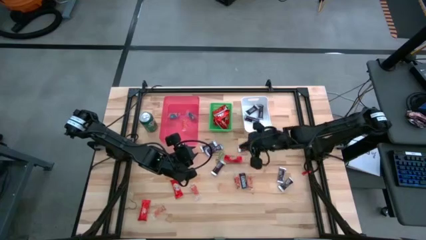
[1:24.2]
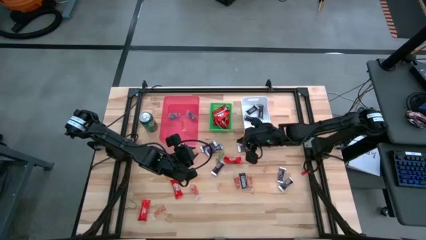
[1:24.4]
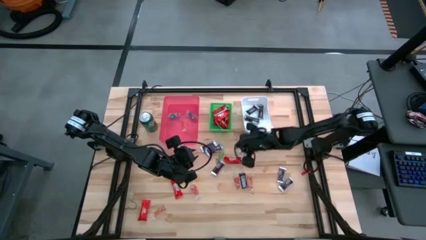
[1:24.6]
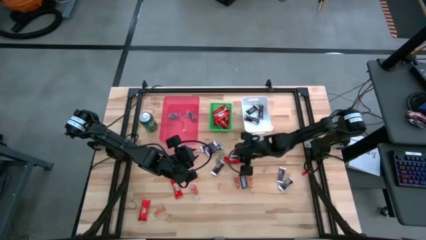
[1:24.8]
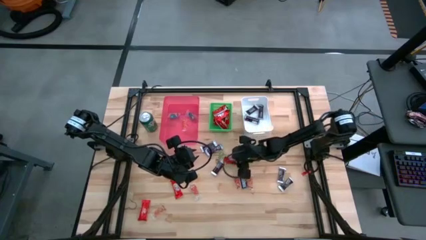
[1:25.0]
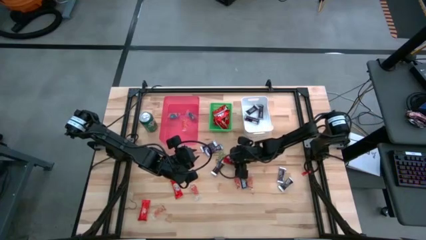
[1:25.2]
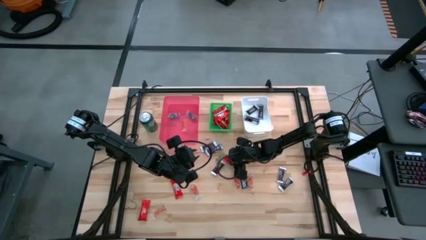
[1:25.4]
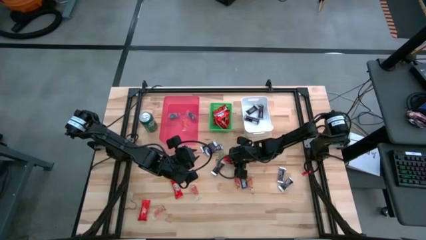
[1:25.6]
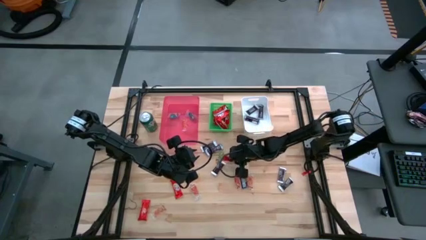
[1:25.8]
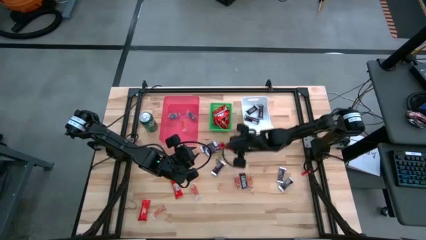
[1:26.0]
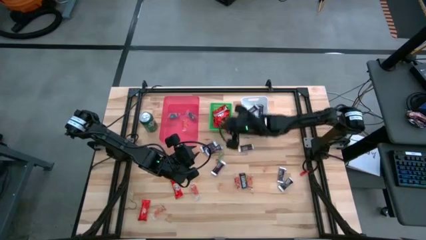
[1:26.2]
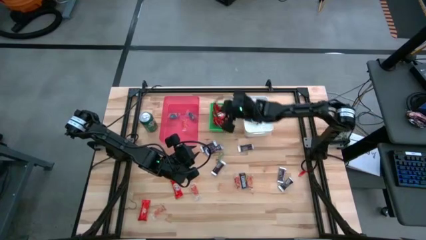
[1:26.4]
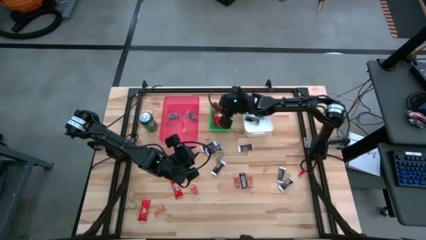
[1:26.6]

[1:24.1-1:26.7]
Task: Sort candy
Put the red chocolate into the green bin

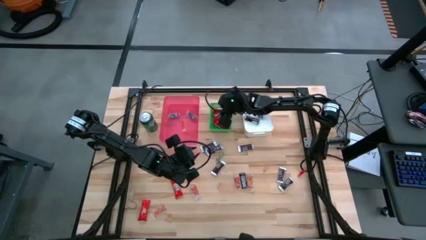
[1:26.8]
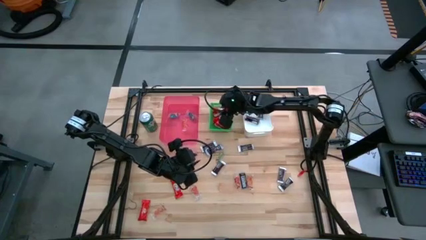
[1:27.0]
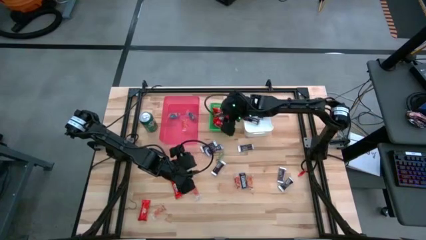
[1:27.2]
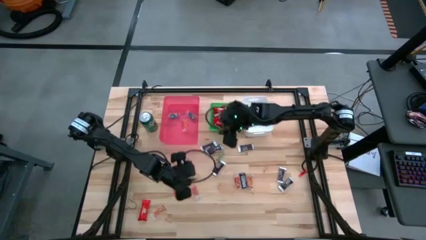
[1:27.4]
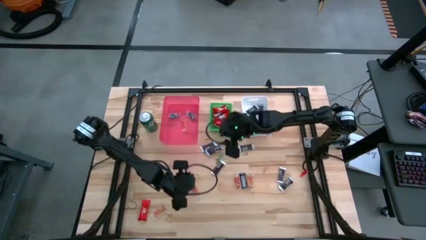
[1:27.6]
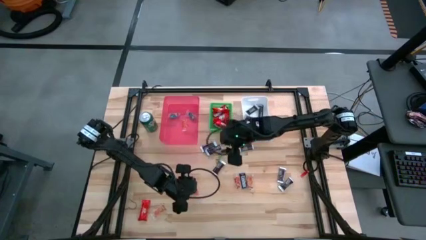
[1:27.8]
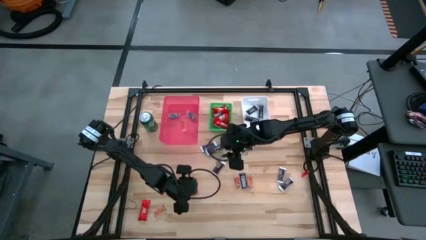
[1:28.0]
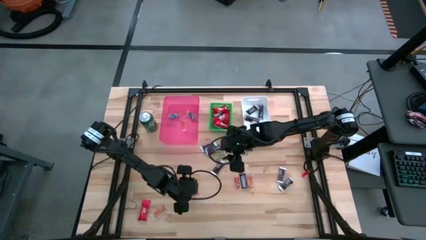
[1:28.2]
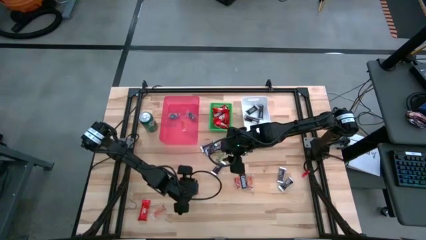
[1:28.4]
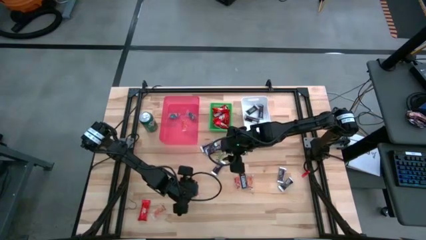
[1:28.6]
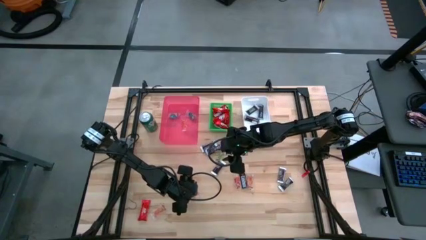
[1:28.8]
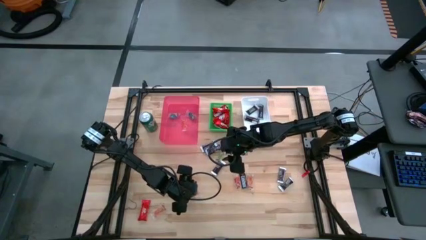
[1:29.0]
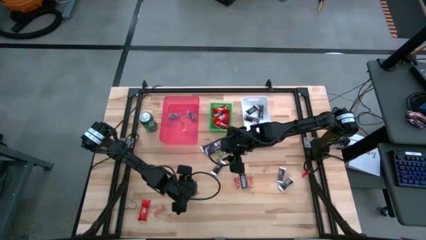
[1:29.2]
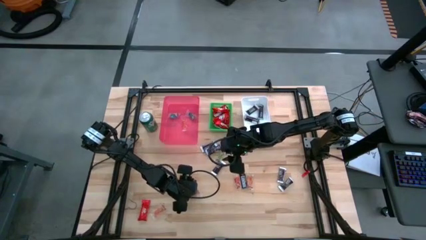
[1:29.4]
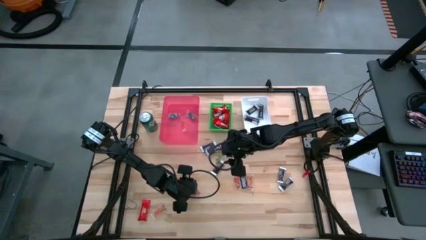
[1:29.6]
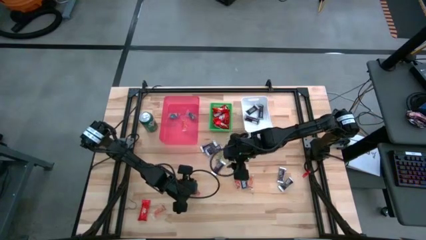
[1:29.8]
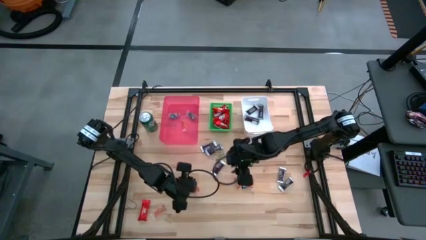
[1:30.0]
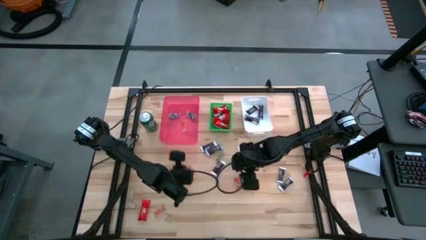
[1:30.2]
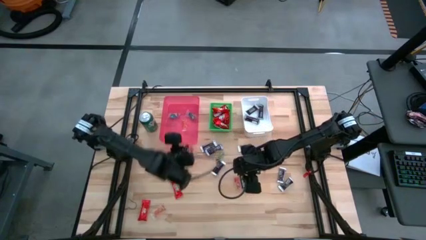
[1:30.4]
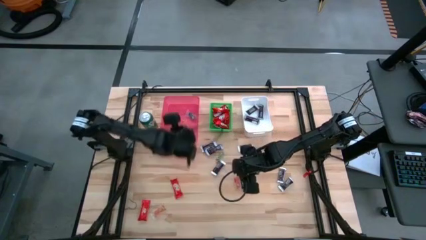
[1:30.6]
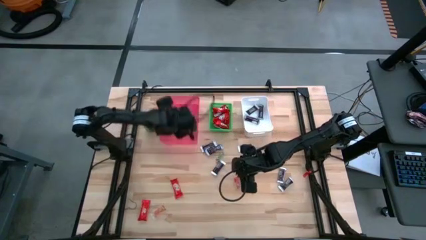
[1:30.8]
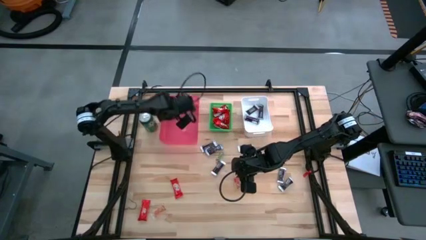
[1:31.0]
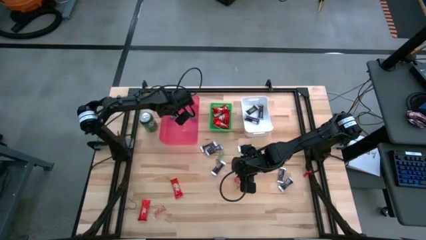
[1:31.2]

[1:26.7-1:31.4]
Put the red gummy into the red bin

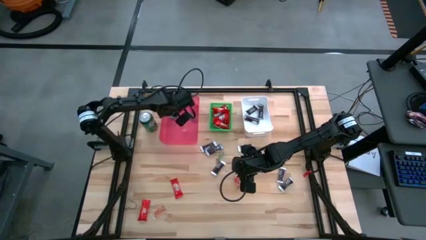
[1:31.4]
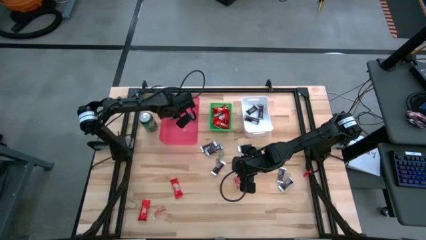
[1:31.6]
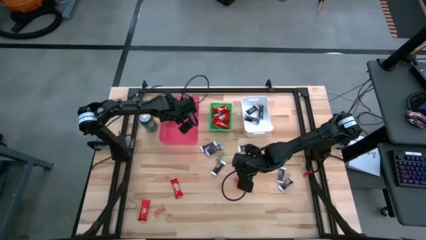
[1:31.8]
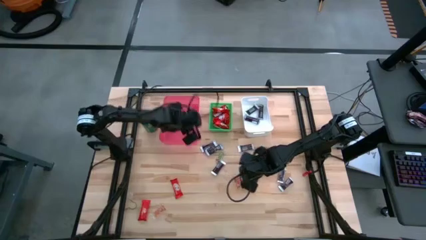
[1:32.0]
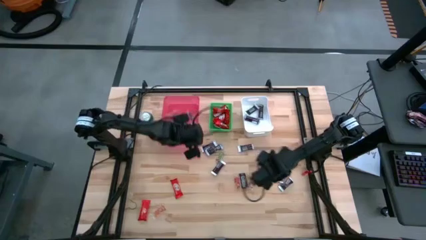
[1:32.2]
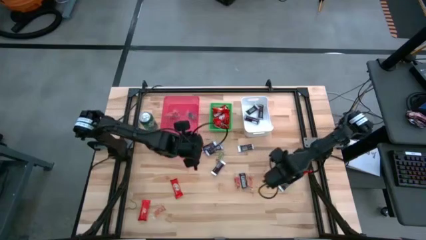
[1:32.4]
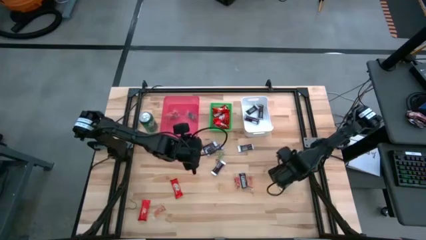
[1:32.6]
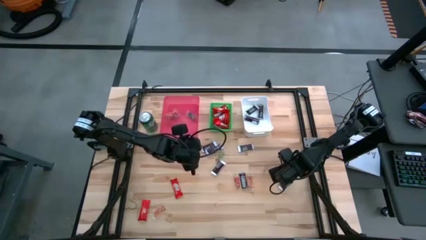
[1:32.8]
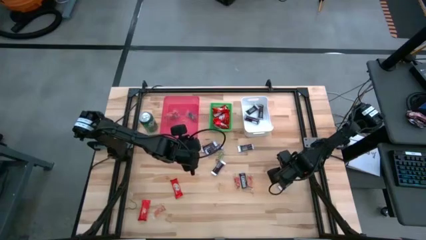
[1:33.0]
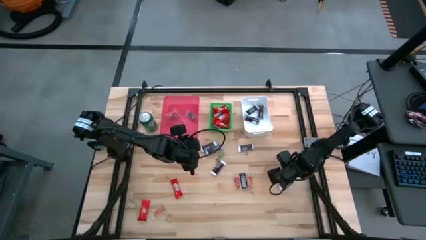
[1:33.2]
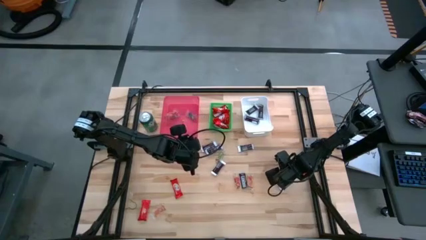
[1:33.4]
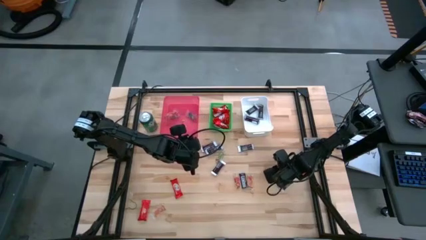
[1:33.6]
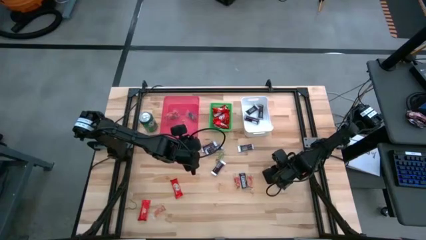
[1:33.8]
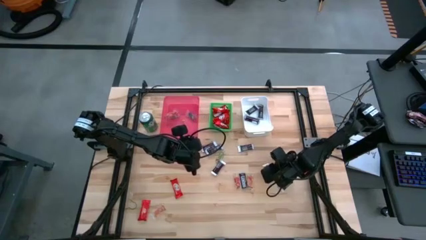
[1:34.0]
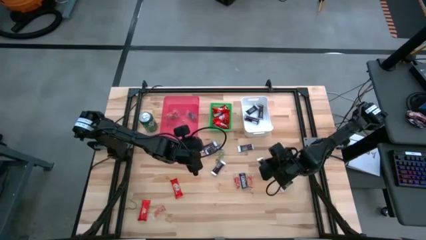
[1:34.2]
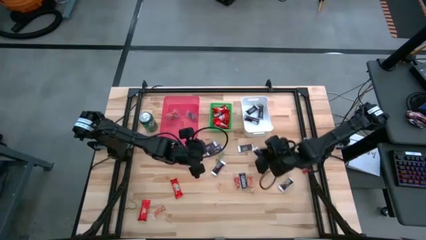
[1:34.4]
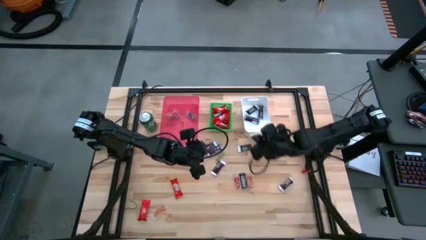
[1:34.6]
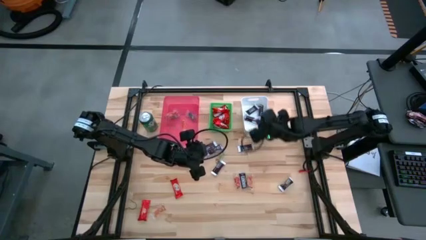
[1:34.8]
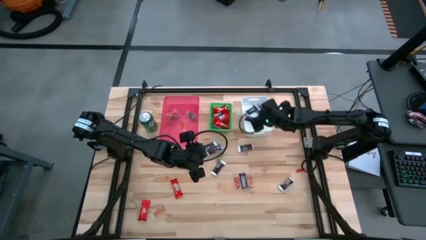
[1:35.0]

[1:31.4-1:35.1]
Put the brown chocolate into the white bin

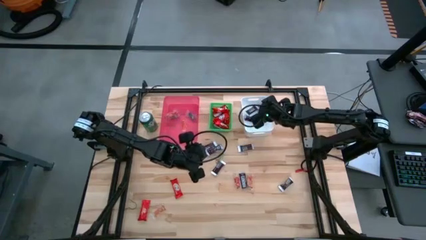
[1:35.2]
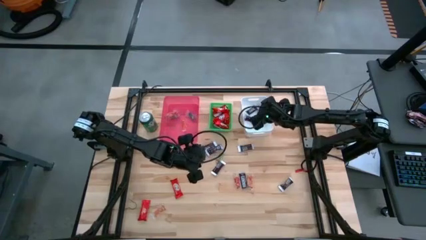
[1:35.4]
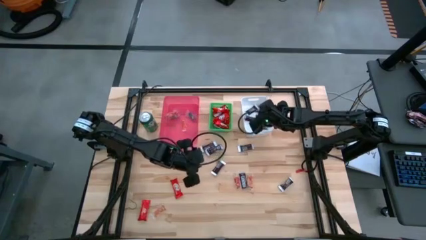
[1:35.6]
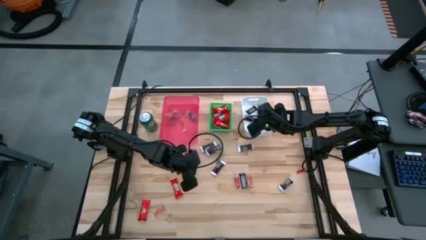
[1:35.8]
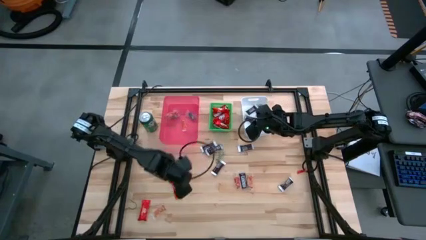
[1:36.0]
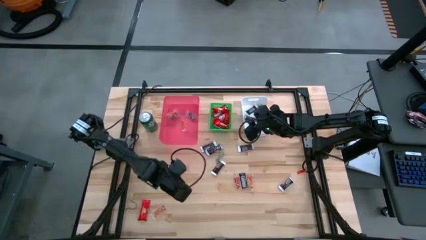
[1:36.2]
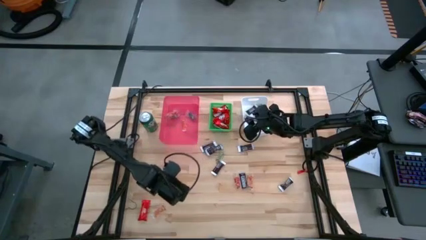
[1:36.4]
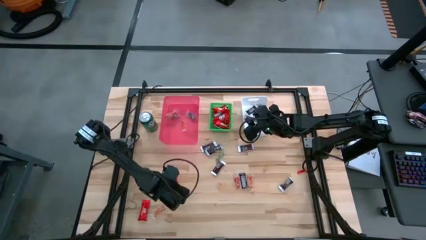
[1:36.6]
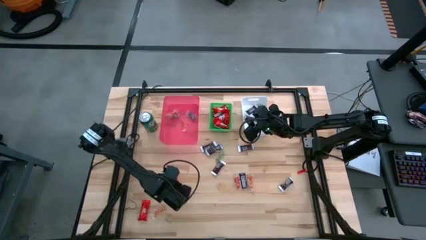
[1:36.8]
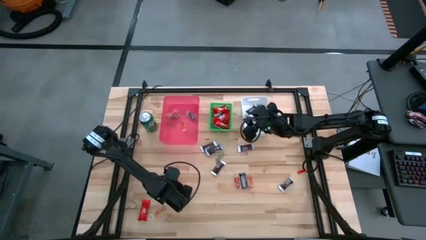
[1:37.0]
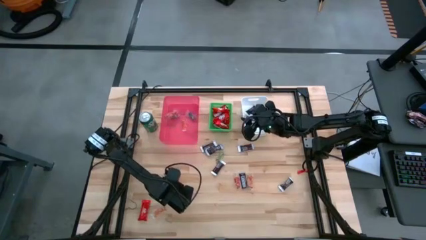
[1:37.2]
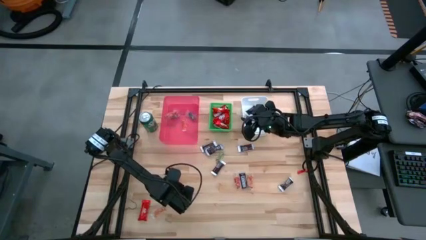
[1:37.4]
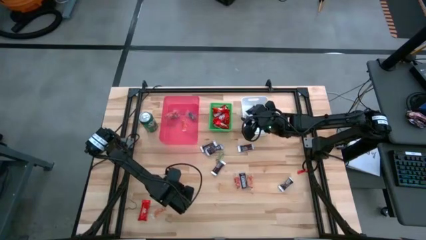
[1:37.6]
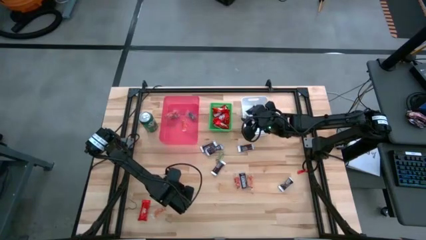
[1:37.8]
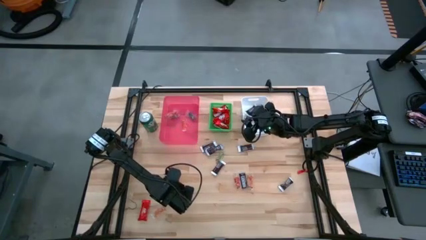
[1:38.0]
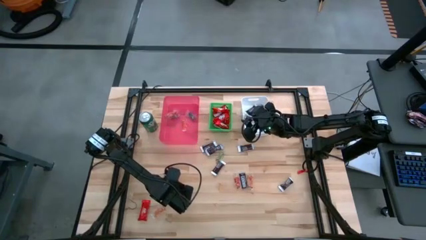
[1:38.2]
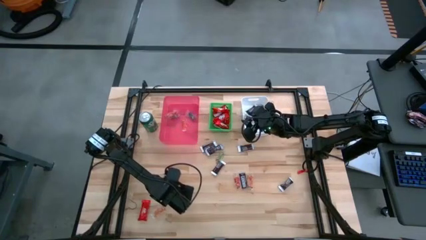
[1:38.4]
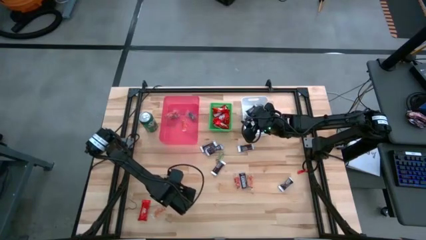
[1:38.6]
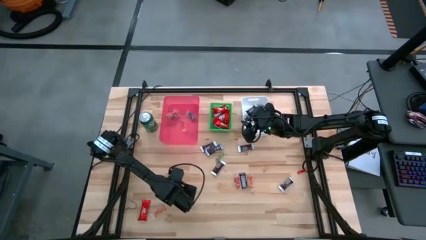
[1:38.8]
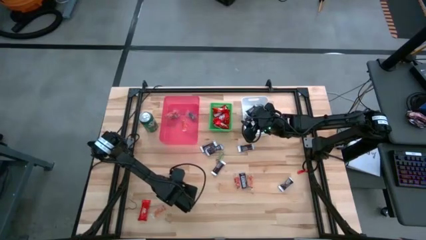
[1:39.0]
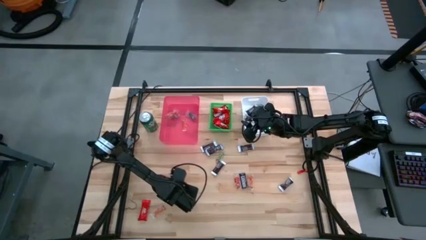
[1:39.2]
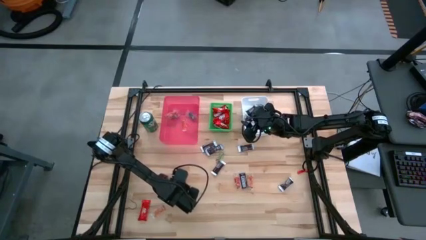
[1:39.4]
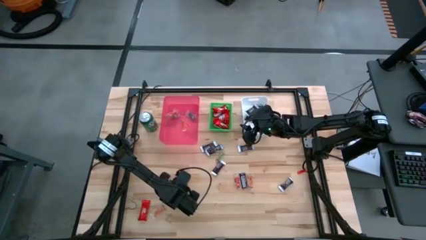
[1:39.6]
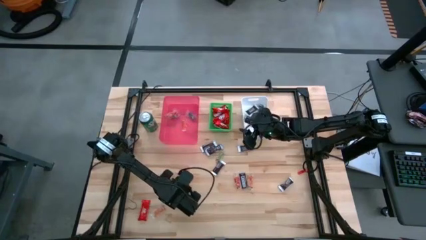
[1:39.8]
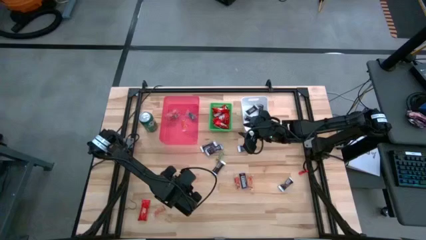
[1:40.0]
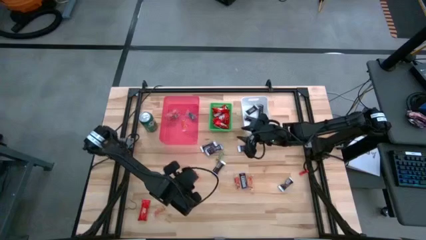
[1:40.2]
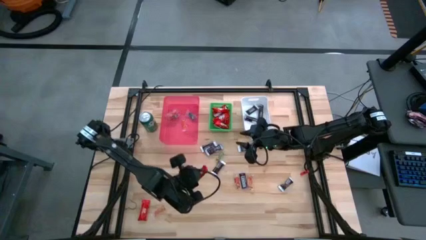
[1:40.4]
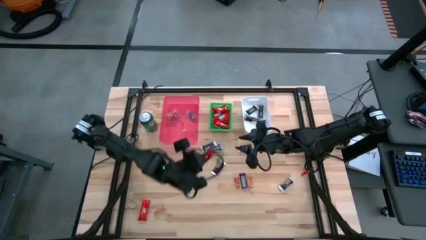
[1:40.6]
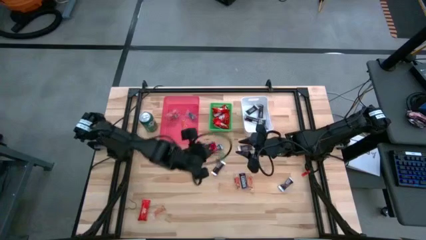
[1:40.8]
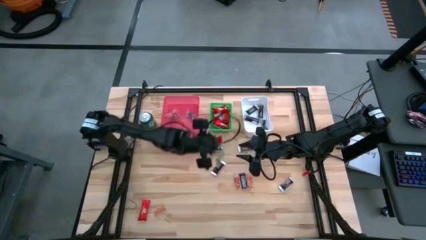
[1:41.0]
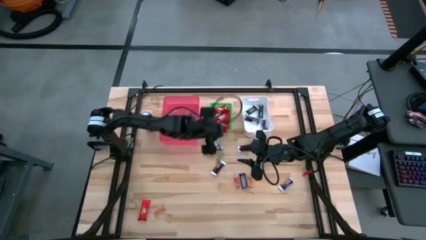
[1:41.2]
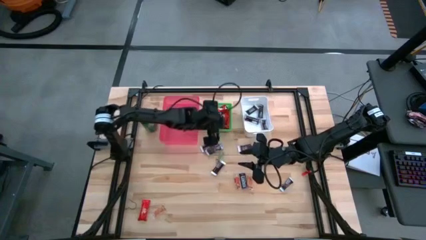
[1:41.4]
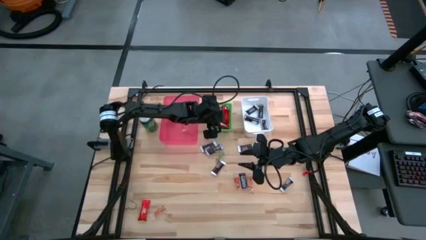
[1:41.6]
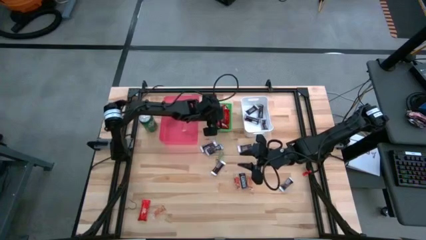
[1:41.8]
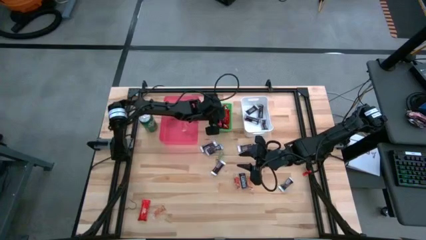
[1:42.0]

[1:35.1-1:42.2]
Put the red chocolate into the green bin
